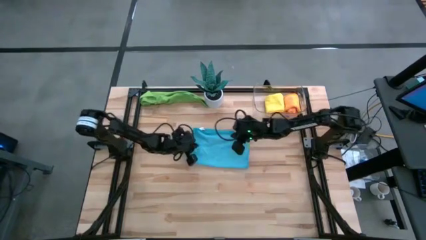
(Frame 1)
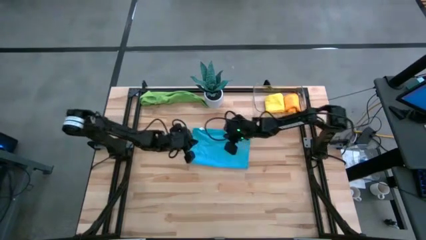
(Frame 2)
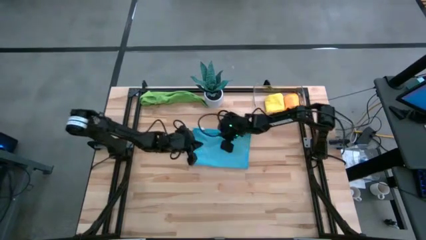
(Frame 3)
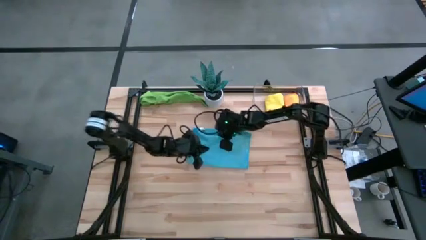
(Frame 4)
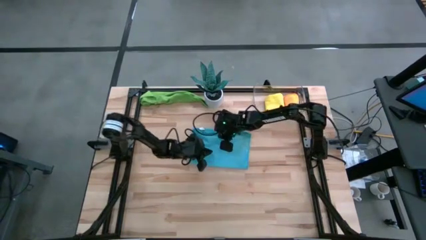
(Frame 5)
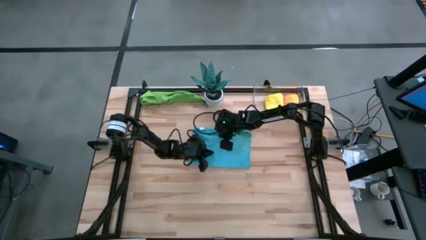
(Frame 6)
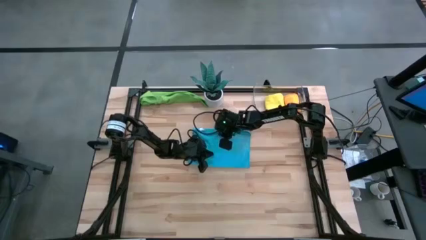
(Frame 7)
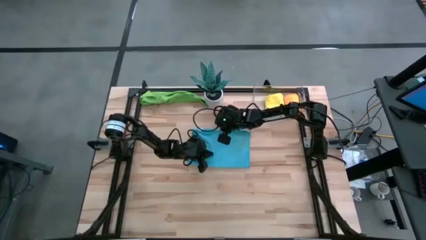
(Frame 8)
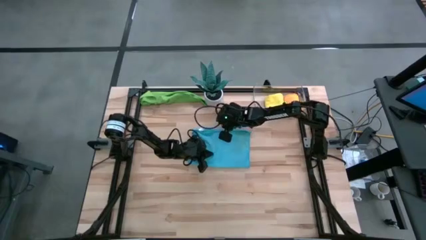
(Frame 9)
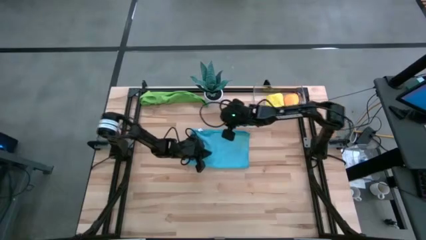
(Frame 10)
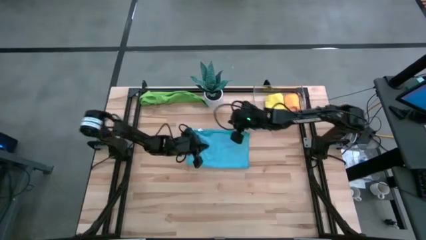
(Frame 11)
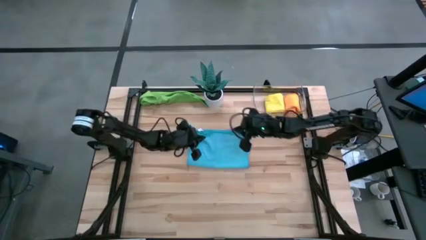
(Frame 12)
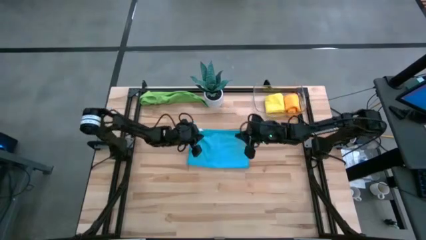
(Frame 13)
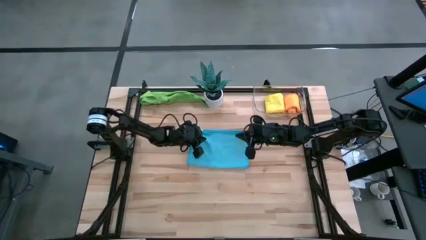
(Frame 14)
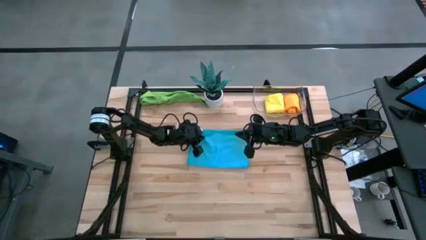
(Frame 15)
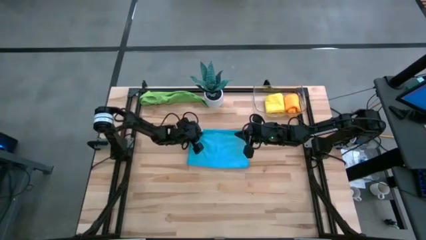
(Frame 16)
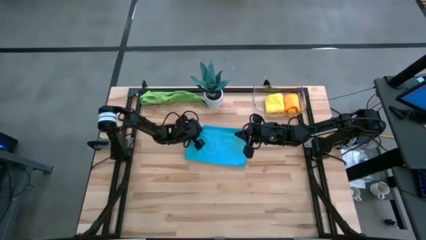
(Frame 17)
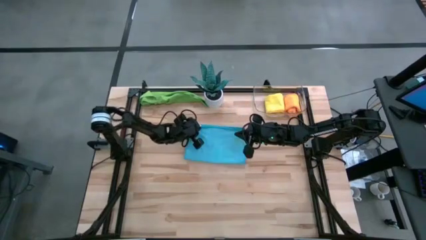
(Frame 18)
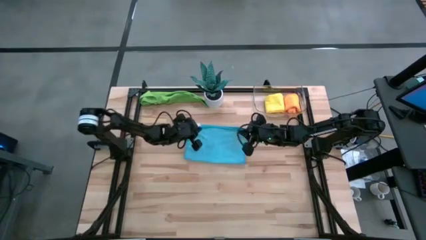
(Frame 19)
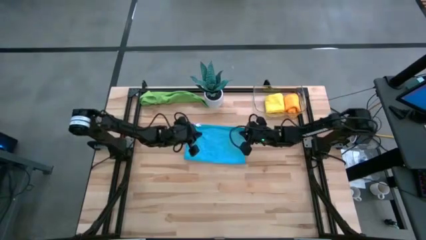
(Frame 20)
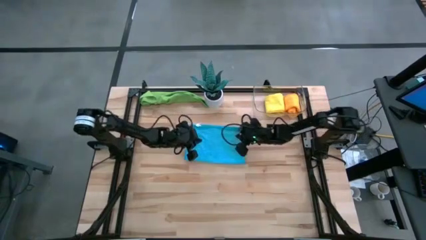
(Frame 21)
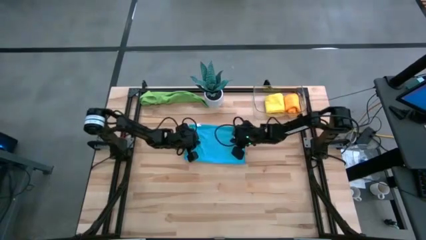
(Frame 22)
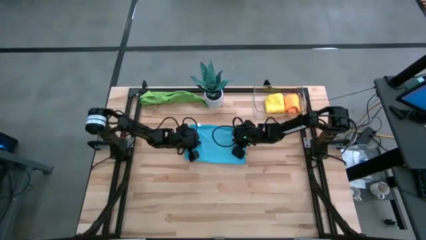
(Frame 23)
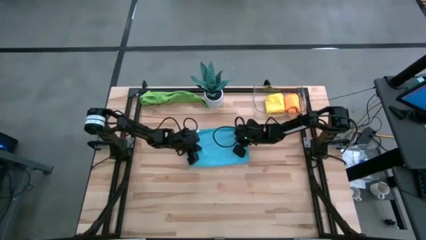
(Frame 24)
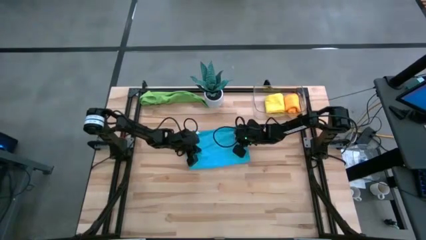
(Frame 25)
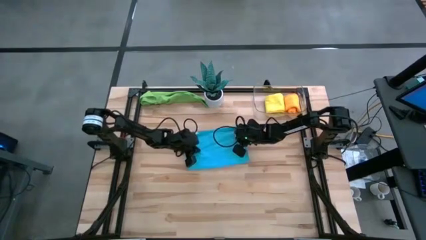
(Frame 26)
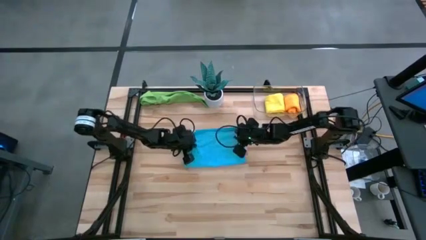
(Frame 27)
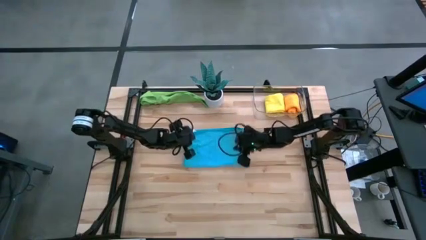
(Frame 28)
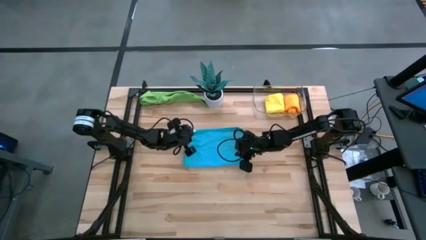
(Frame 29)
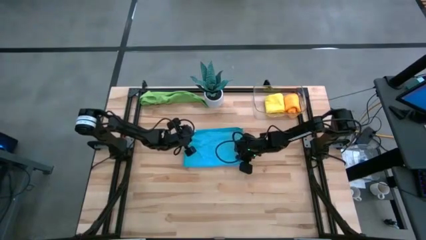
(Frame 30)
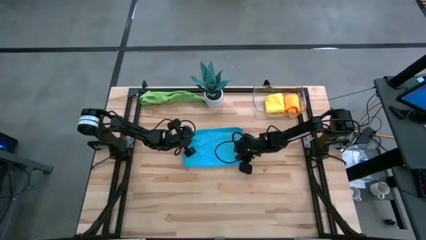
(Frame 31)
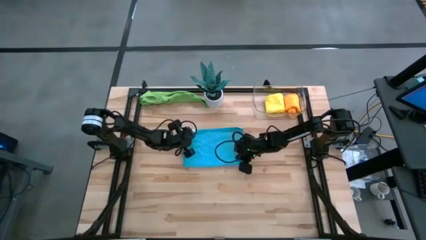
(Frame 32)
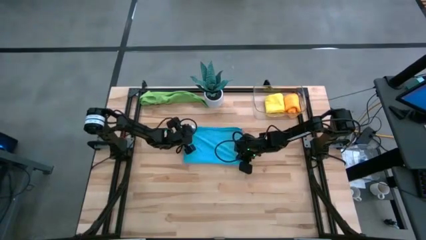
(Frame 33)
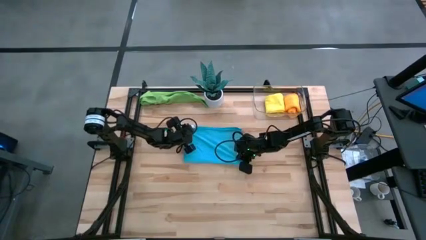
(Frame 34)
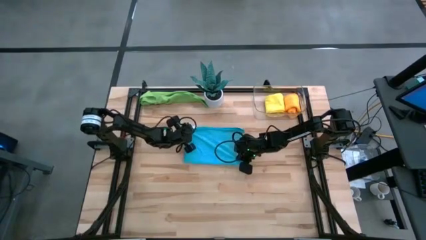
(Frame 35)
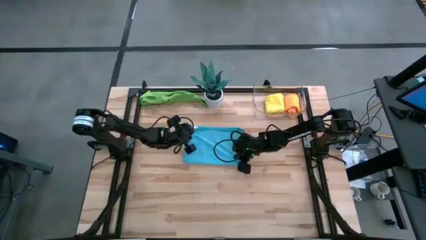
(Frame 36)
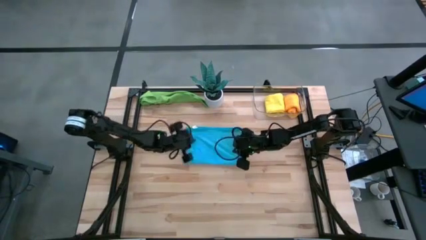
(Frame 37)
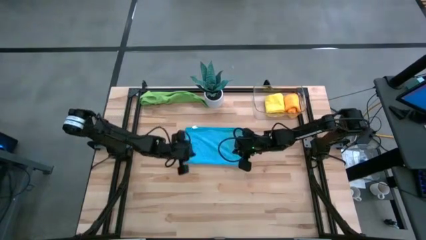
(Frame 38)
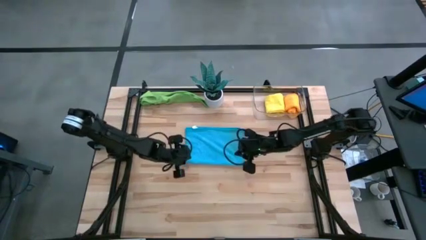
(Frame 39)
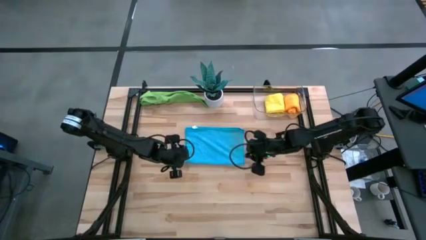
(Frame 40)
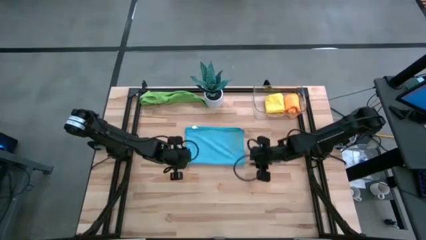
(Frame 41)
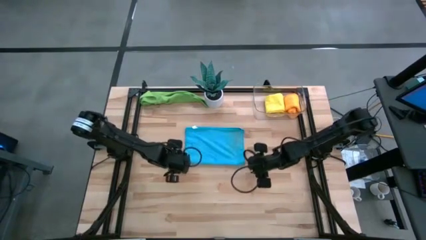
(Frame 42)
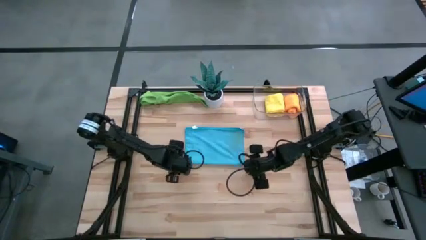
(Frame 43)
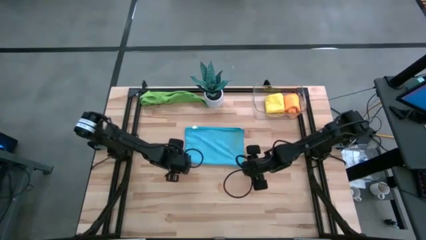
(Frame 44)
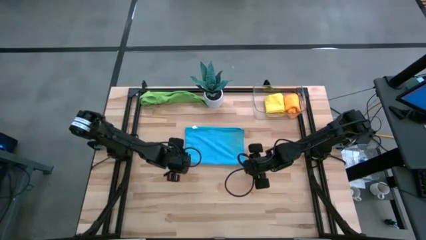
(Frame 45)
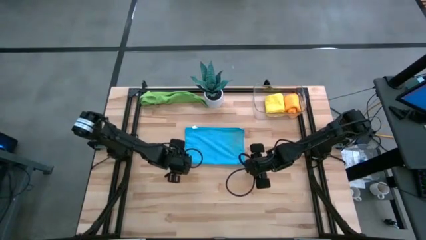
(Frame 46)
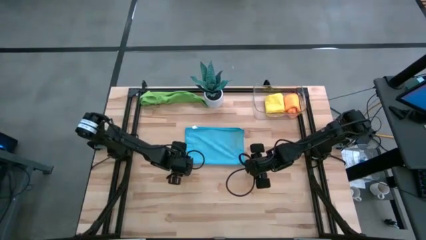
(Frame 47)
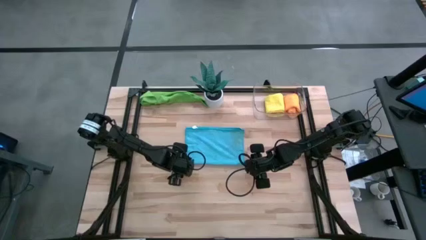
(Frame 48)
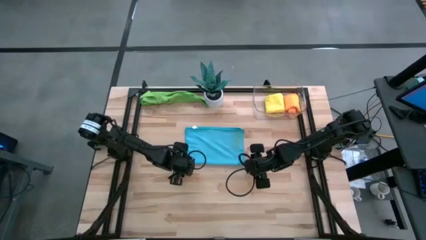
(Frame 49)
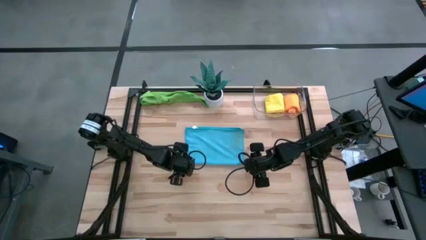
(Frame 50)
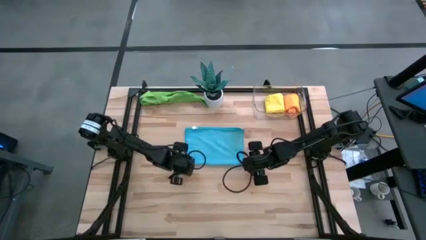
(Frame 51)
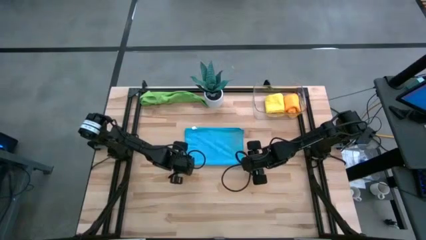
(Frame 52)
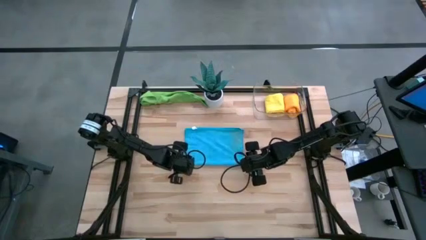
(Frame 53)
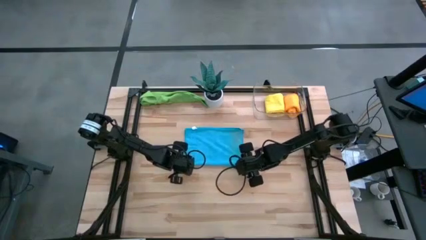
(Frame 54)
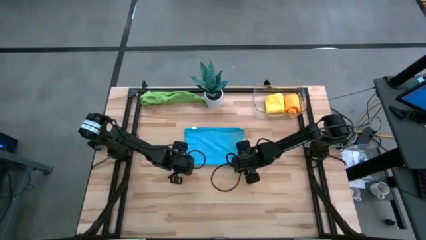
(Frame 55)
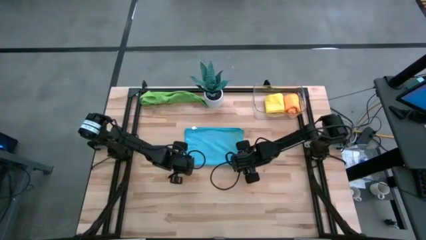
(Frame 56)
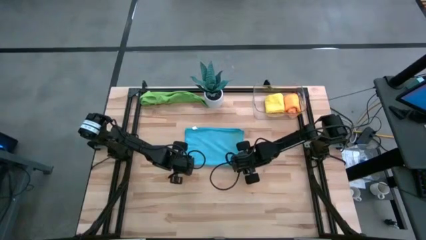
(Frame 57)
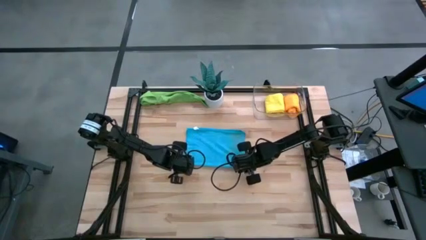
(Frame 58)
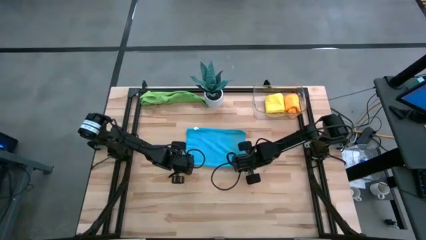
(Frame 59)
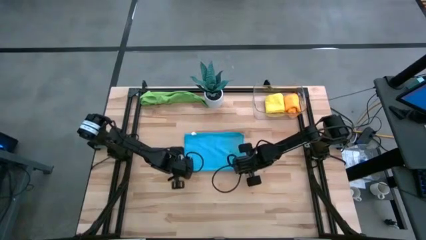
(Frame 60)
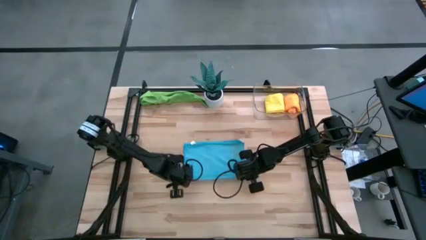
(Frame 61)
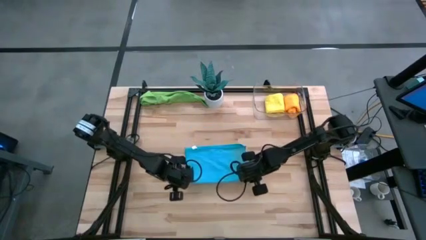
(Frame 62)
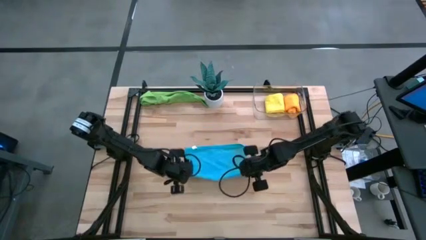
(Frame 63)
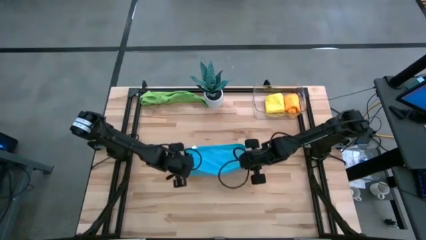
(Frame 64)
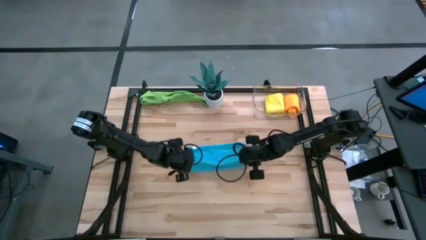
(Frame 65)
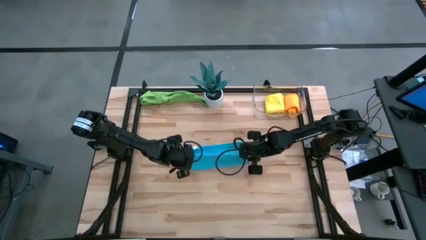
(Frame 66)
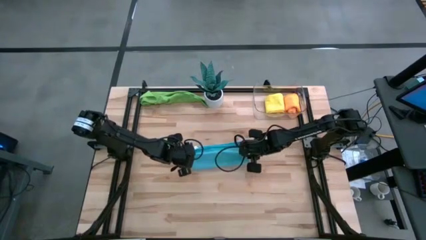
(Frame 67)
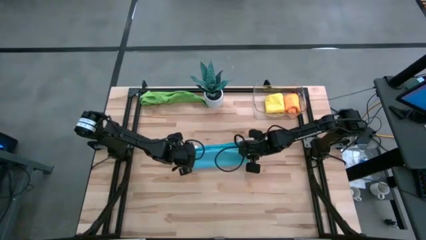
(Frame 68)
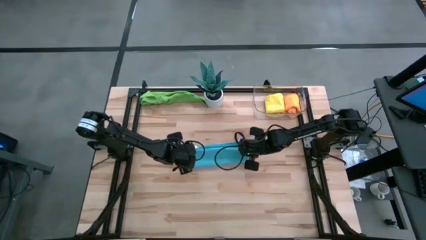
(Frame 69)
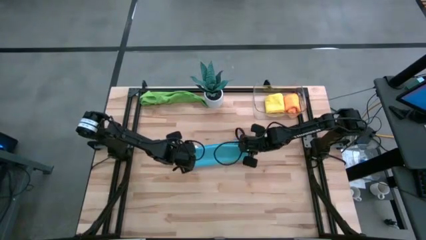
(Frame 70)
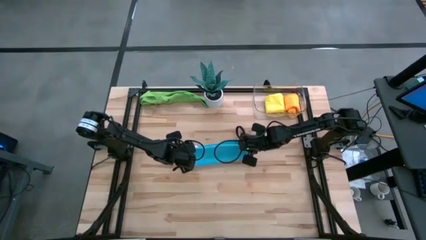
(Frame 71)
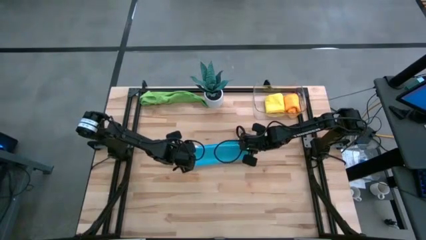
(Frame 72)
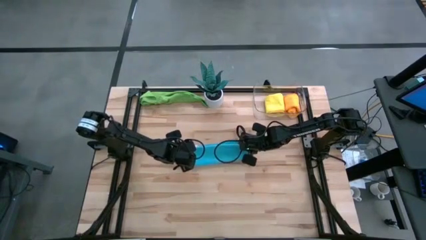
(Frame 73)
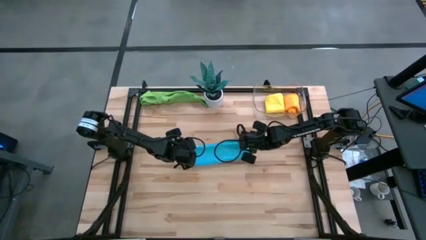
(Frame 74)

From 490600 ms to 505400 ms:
Task: Roll microfiber towels into tight, uniform cylinder then place into a basket
Fold the blue microfiber cloth

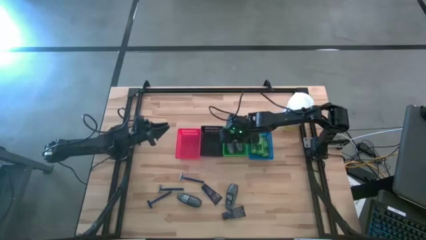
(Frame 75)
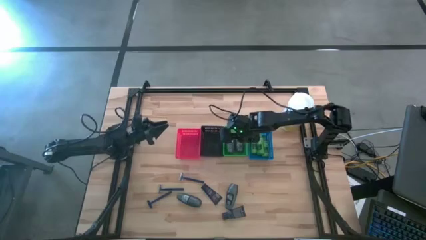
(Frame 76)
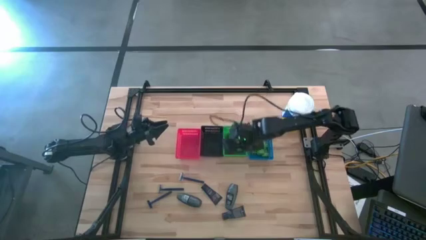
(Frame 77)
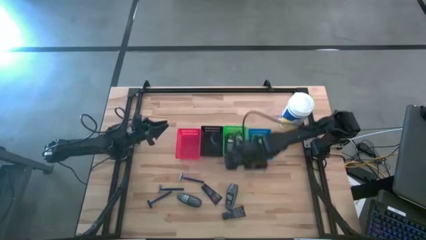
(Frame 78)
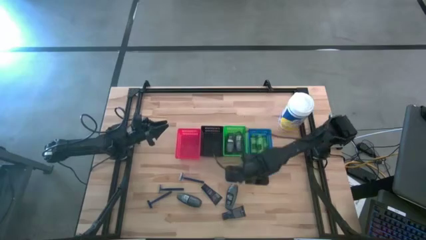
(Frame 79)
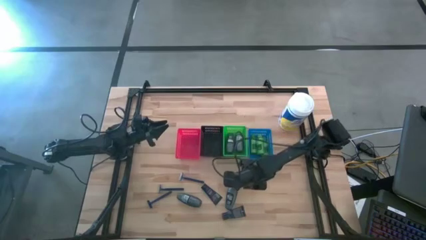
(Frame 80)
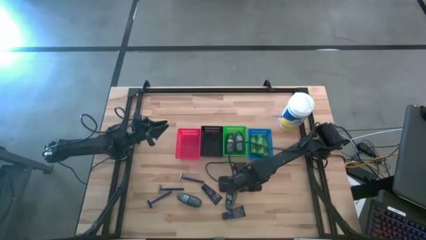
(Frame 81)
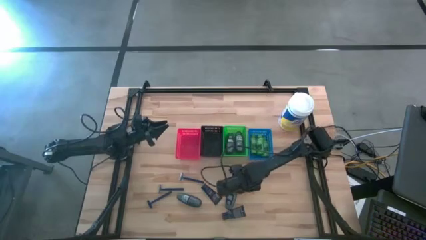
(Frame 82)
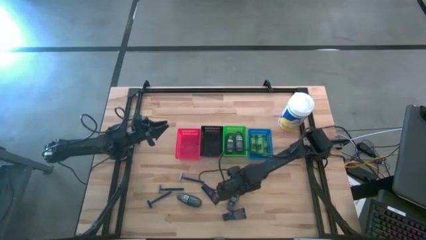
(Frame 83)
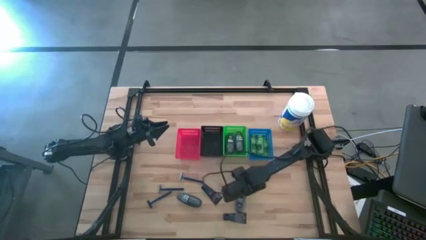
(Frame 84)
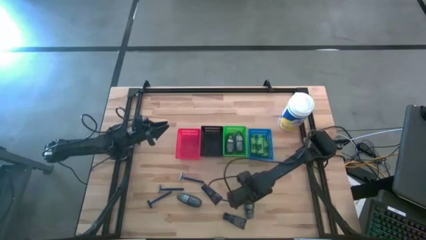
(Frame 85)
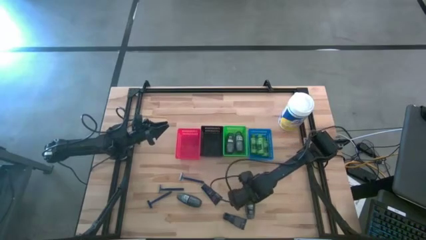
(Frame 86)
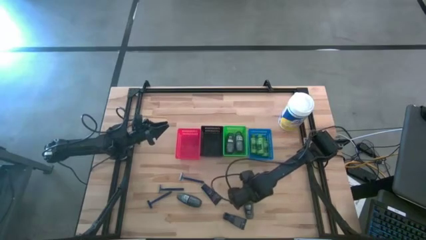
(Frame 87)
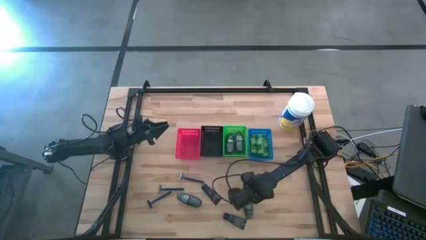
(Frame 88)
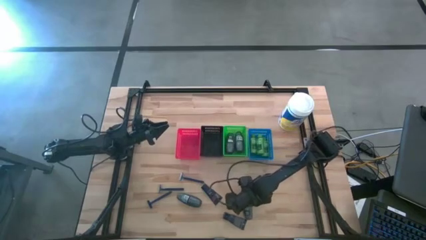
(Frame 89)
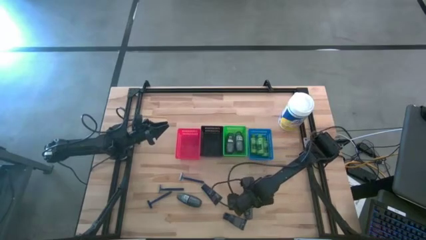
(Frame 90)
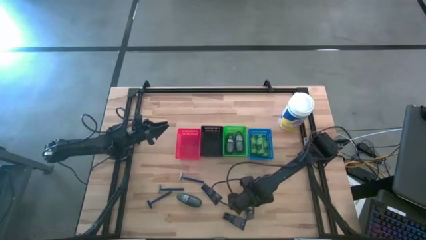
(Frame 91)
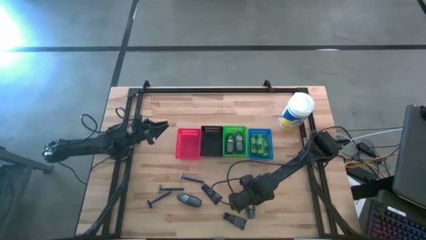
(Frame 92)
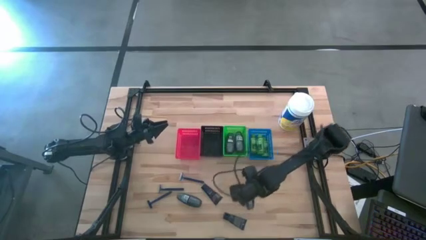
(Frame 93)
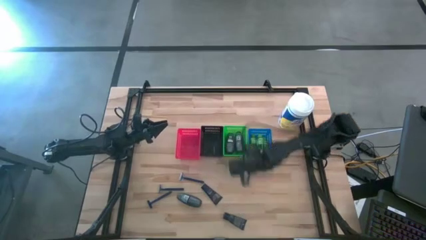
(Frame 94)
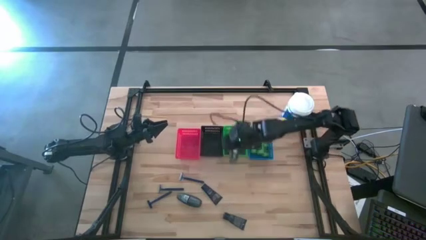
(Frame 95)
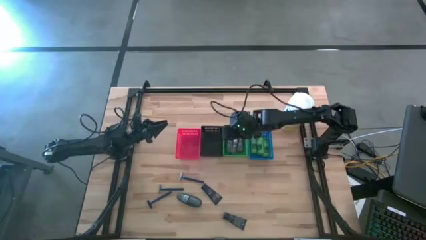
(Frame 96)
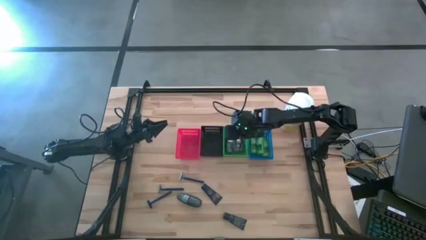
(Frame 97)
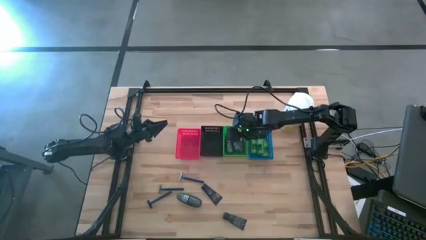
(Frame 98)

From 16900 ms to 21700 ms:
Task: Pick & Place Travel size toiletries
Put the black deodorant into the green bin
